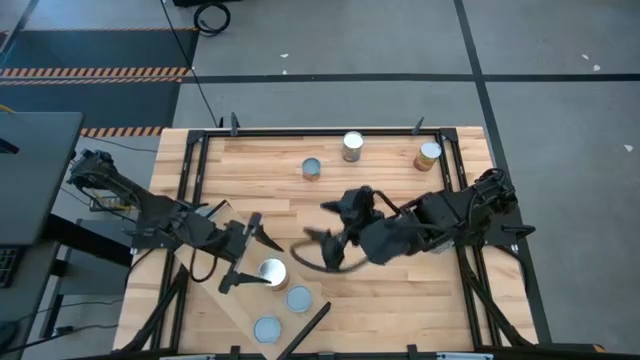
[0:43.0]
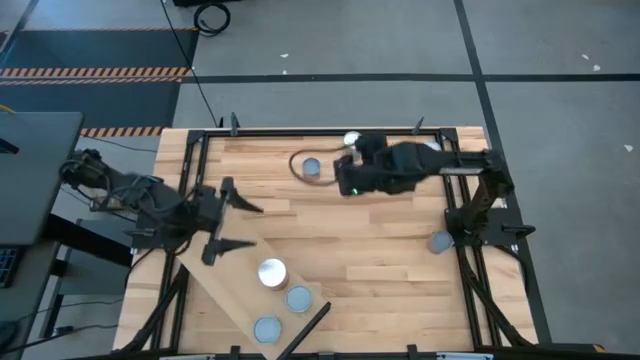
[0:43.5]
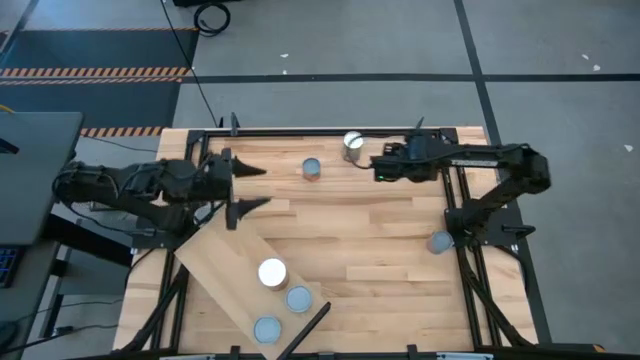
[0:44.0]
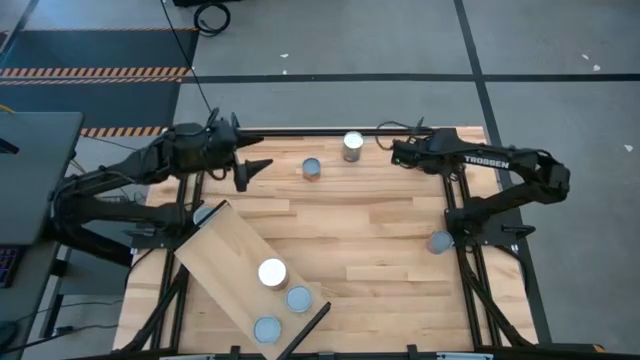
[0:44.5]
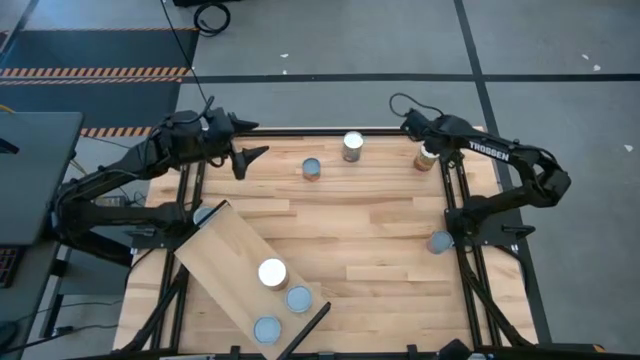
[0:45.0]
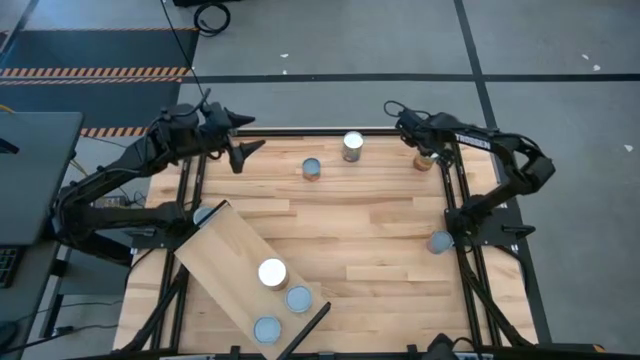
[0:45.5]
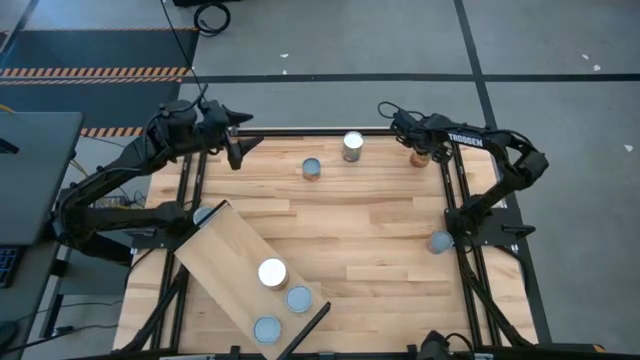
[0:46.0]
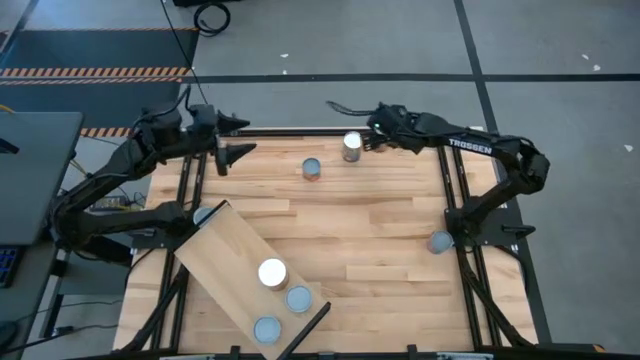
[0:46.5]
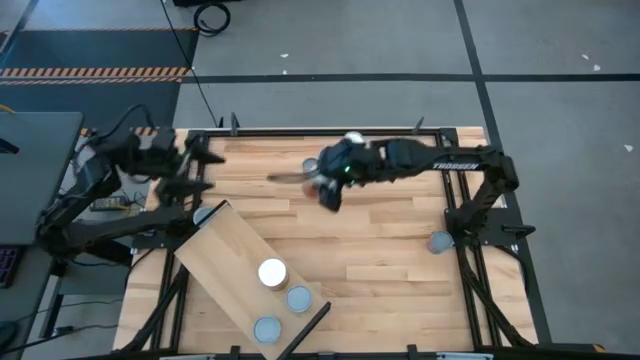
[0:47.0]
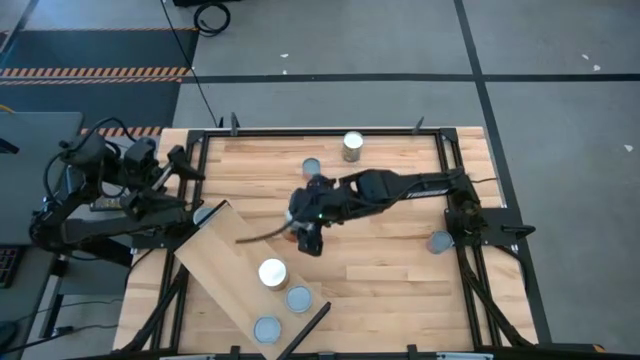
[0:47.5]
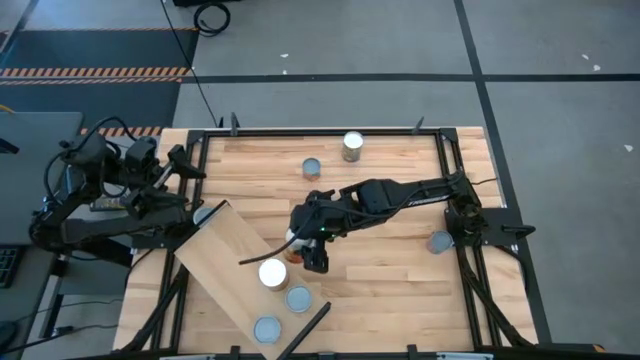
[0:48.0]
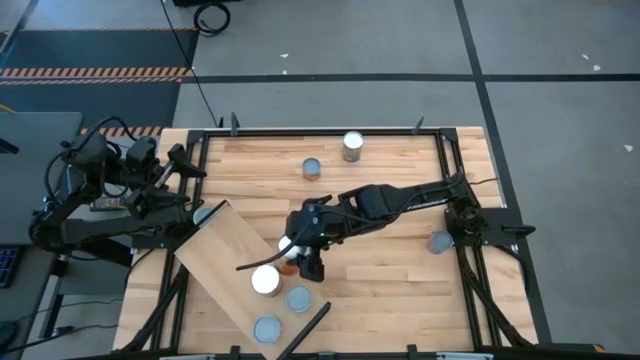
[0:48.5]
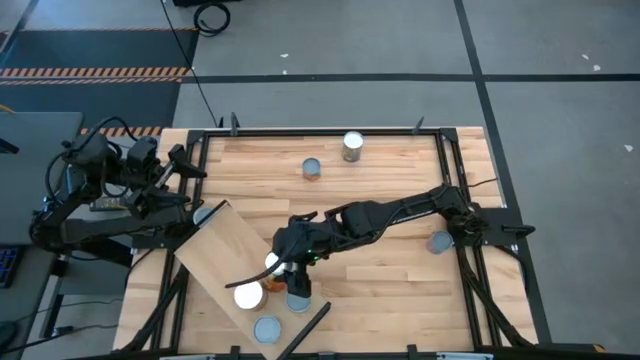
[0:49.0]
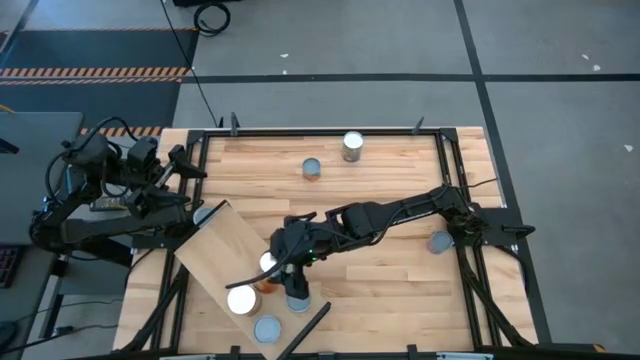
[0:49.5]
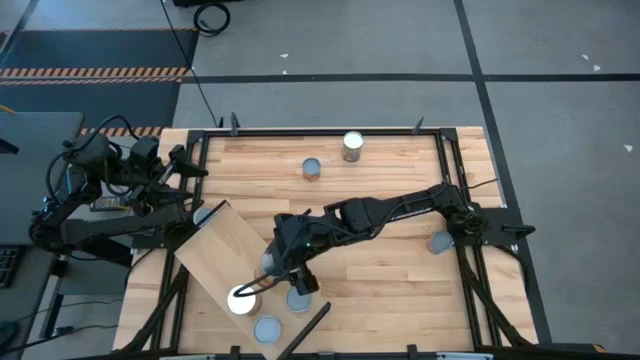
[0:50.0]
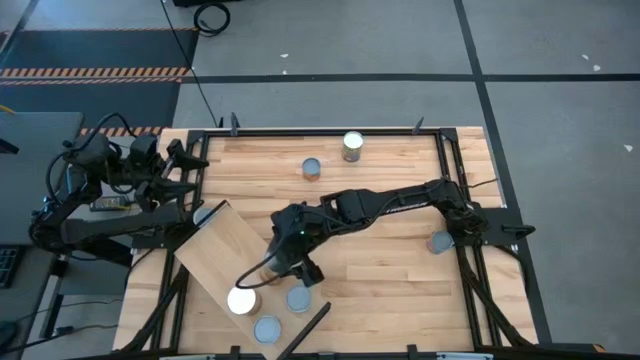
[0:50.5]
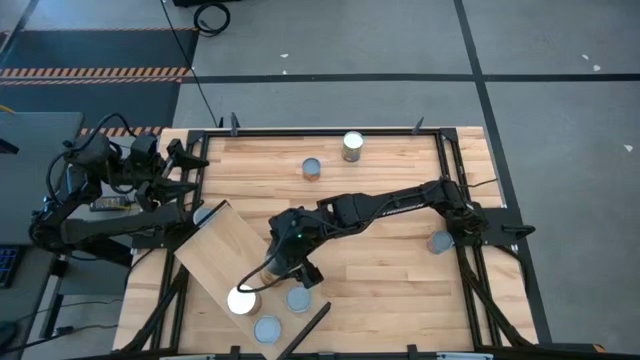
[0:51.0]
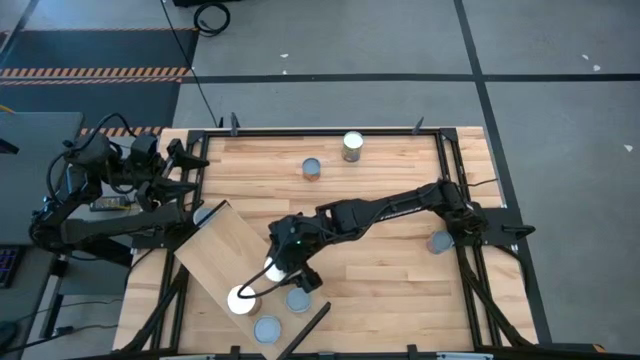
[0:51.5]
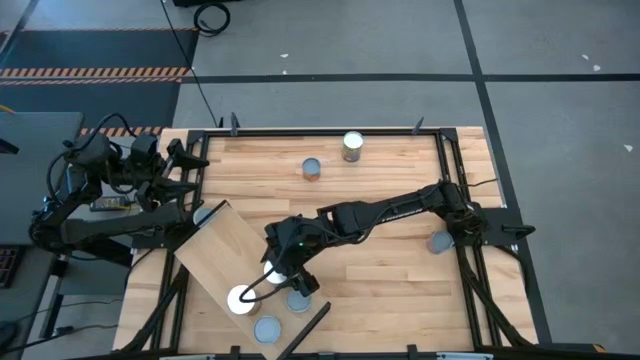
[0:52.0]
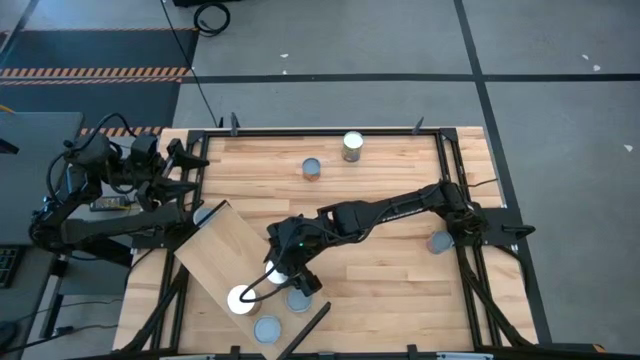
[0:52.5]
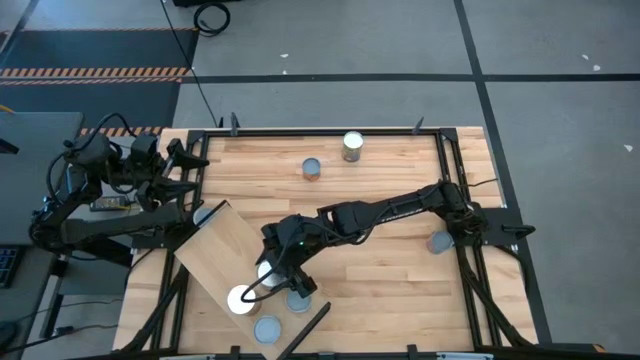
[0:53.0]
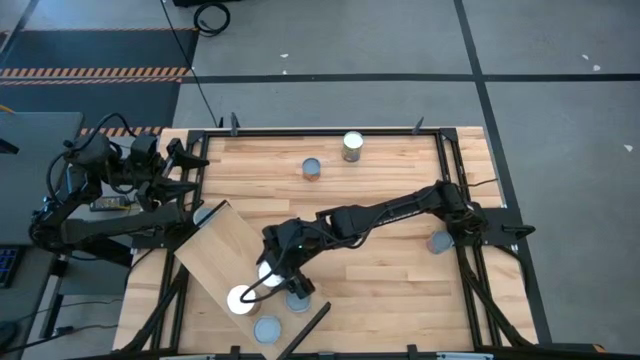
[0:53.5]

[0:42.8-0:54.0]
Task: Pick and place cans onto a shelf
Put the canned corn on the shelf aligned with the canned corn

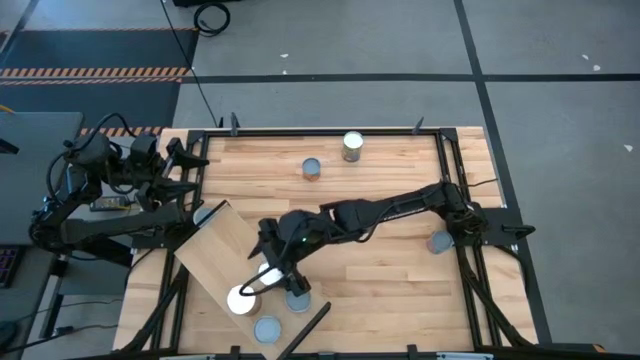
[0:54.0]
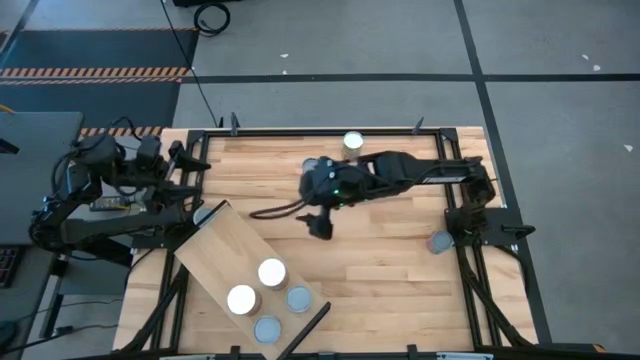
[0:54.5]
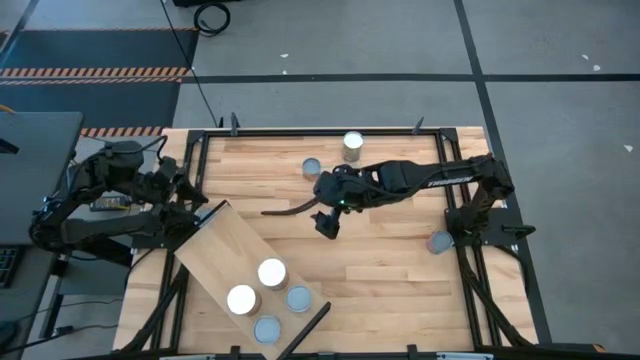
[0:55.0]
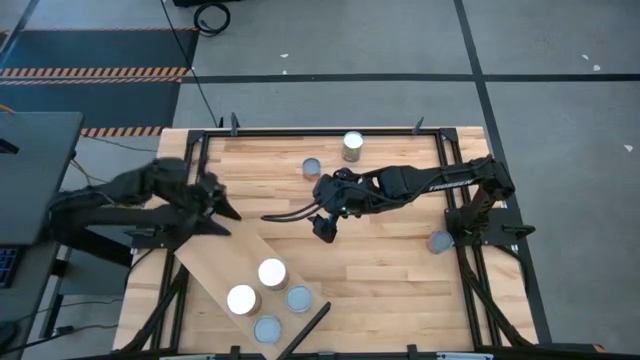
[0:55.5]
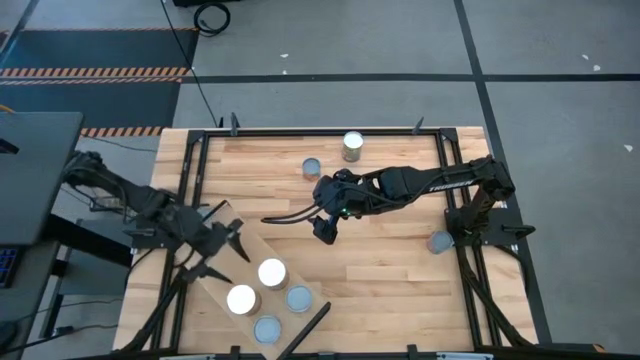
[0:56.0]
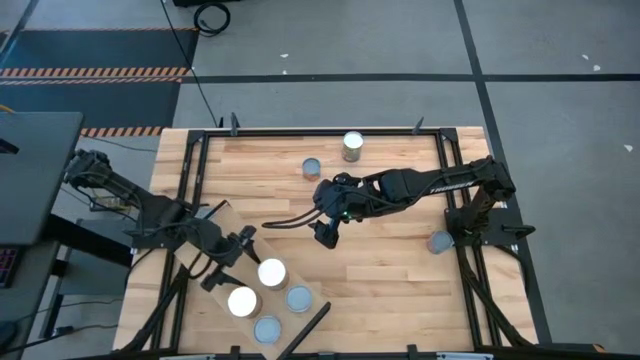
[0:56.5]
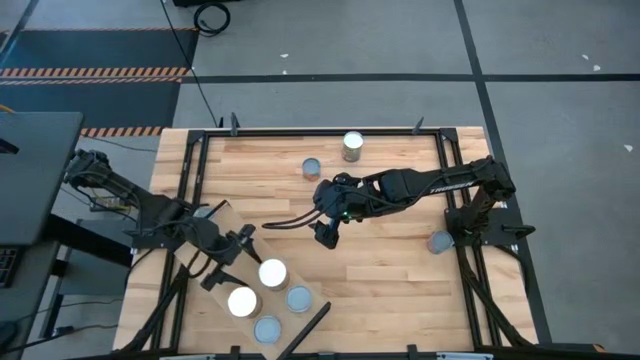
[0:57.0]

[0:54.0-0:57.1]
Adjust the canned corn on the shelf

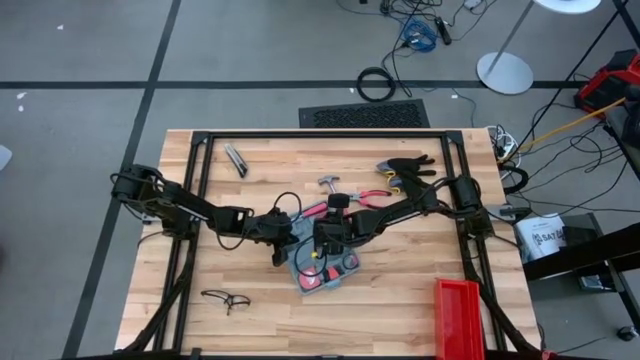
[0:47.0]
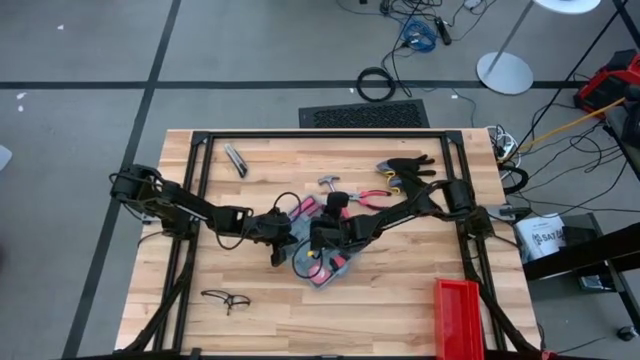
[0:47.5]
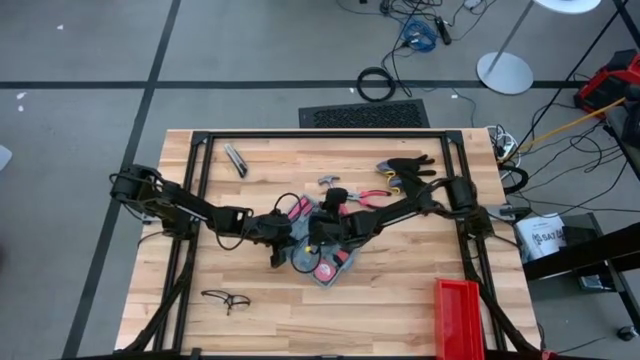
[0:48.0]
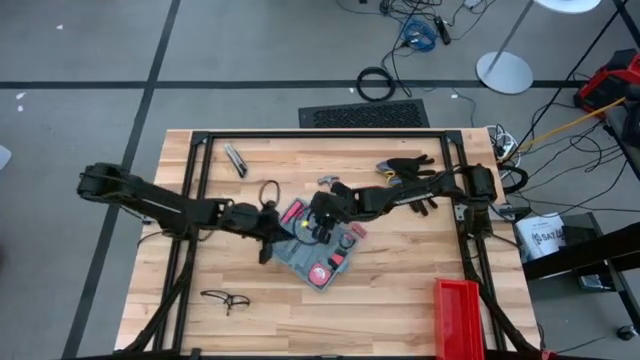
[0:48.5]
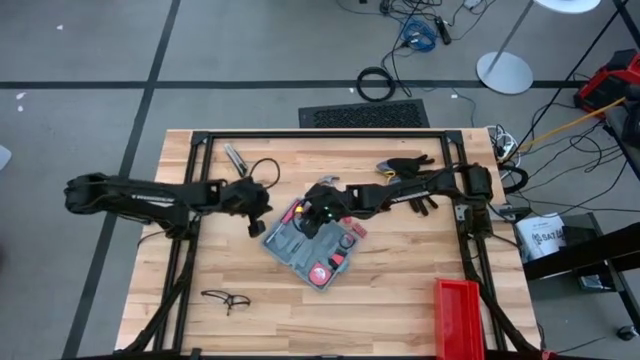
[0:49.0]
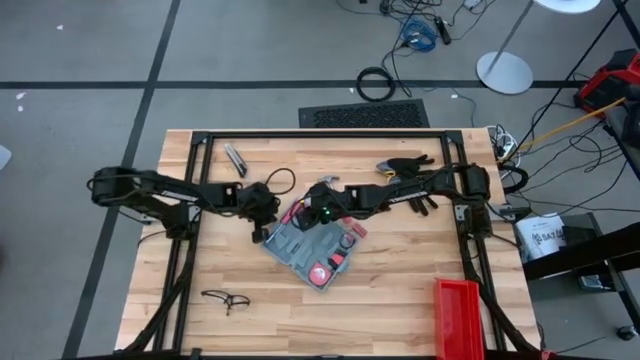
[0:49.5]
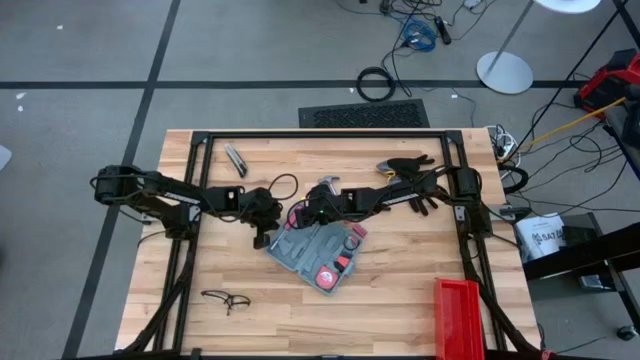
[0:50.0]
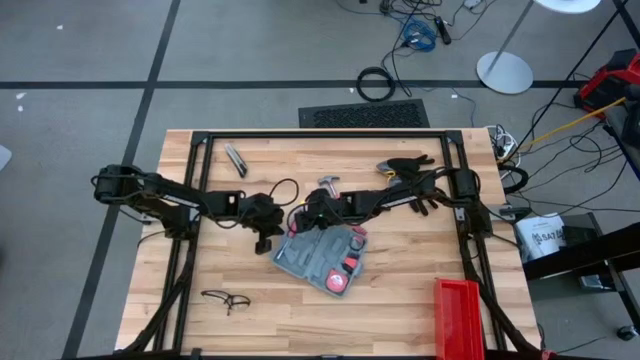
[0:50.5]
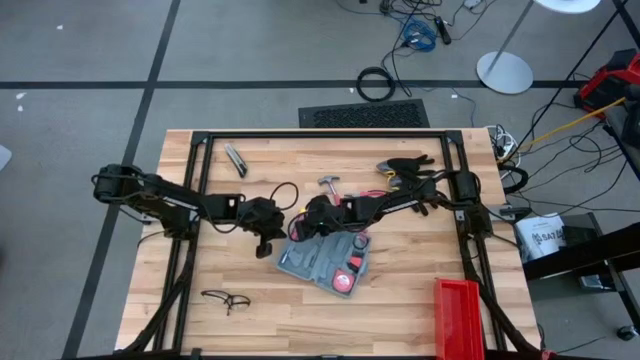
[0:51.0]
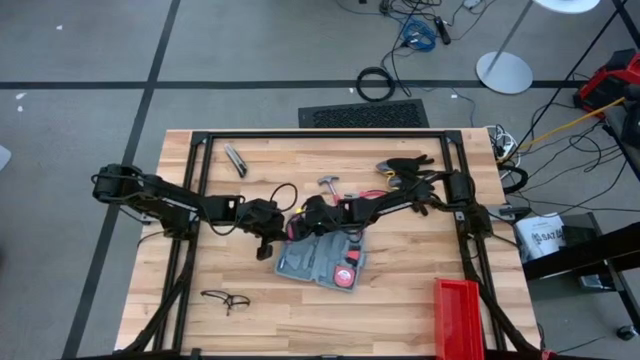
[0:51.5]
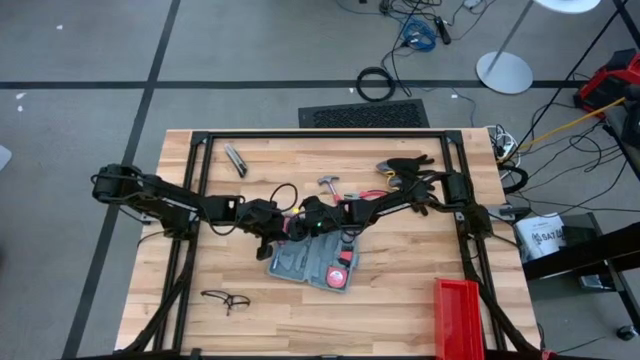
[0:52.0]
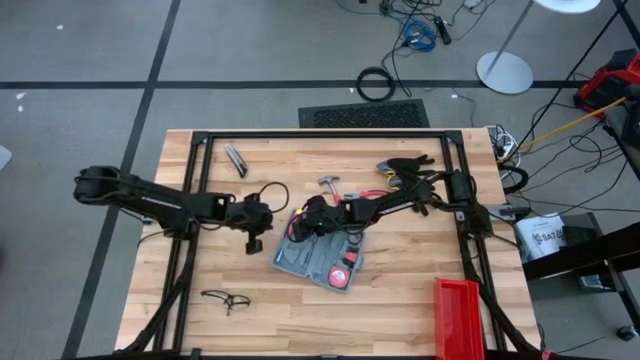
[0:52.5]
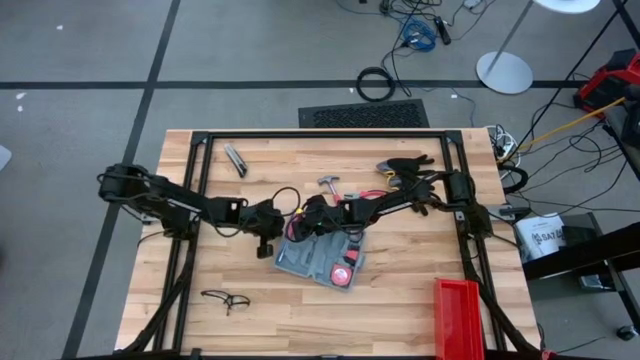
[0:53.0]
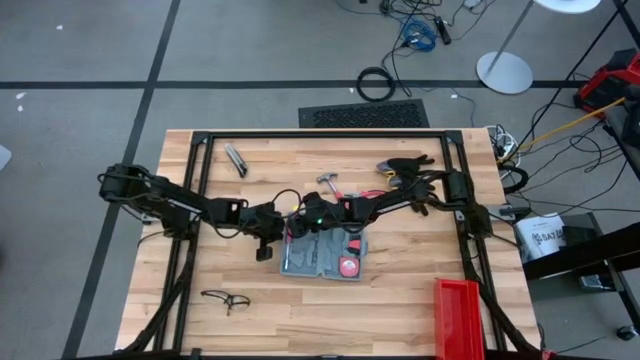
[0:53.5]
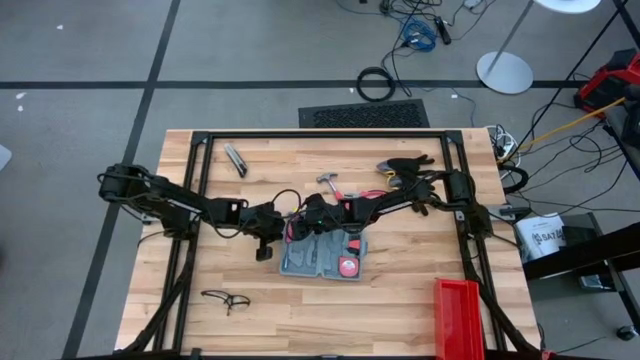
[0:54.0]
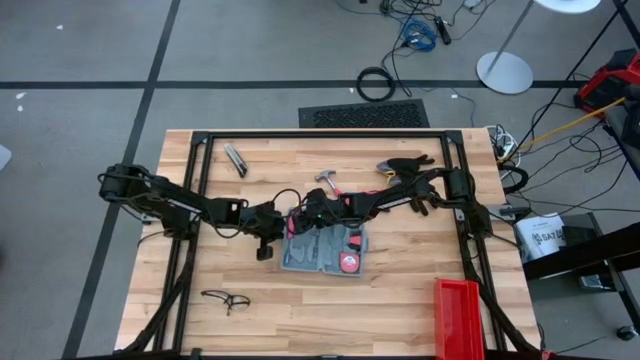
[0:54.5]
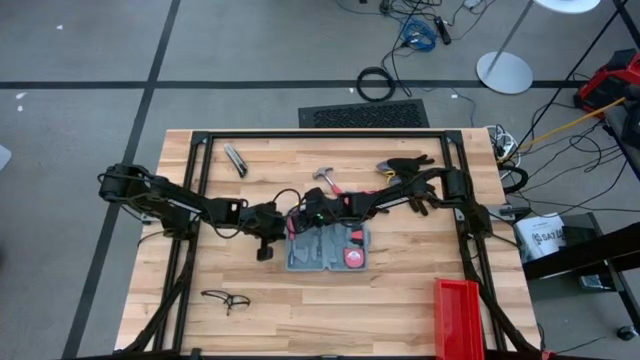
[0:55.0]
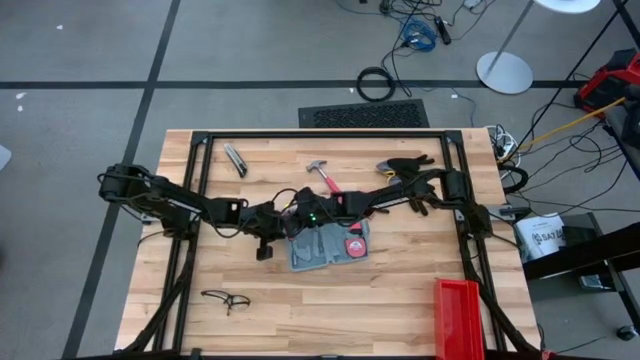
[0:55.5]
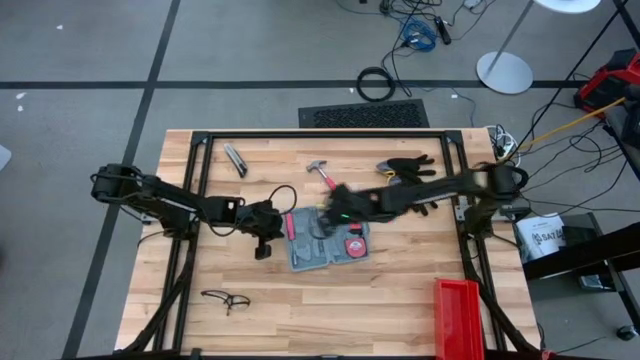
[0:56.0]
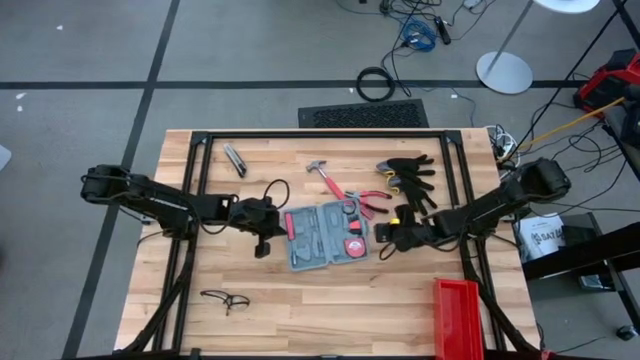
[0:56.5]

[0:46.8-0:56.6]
Task: prefit tool cases
Remove the pink terminal block from the gray prefit tool case
